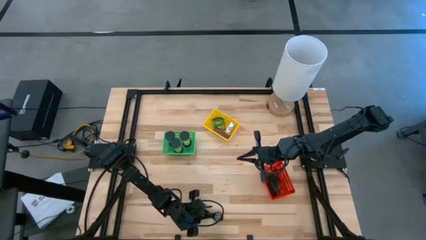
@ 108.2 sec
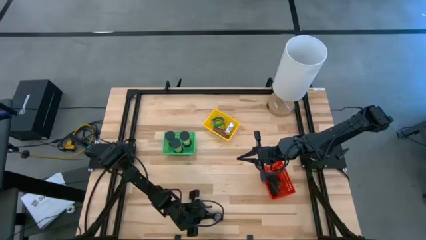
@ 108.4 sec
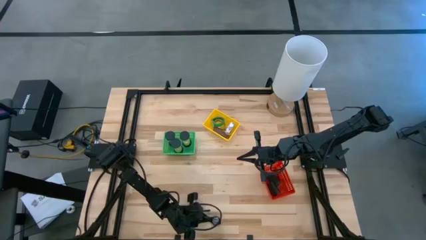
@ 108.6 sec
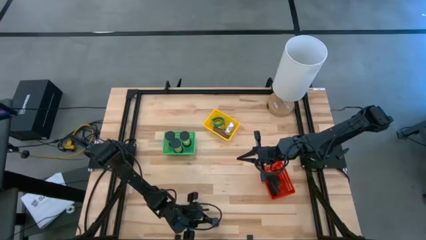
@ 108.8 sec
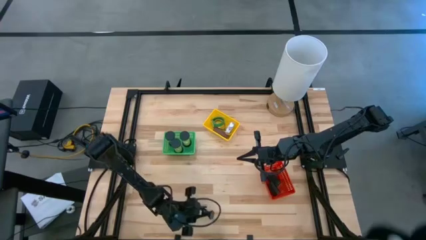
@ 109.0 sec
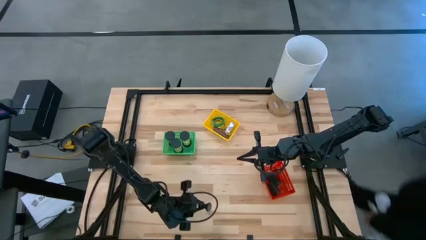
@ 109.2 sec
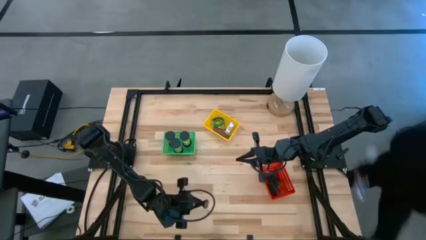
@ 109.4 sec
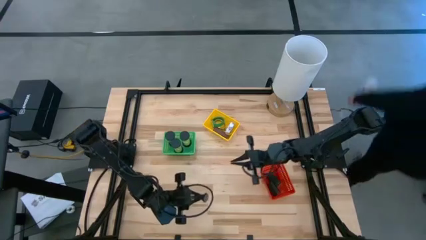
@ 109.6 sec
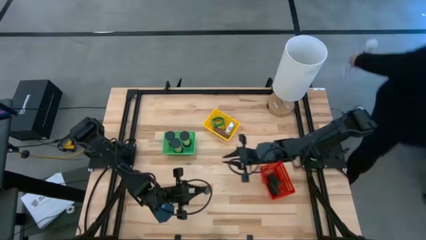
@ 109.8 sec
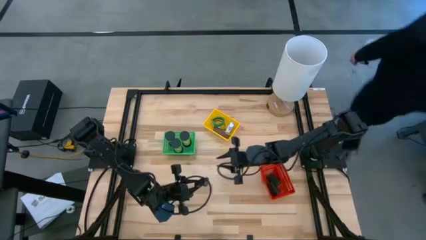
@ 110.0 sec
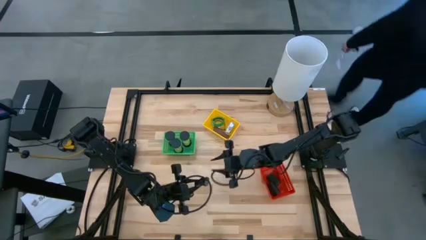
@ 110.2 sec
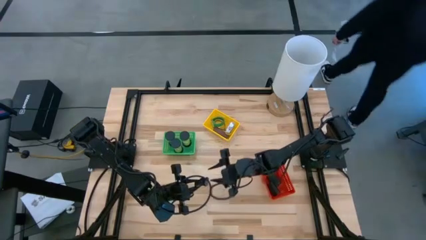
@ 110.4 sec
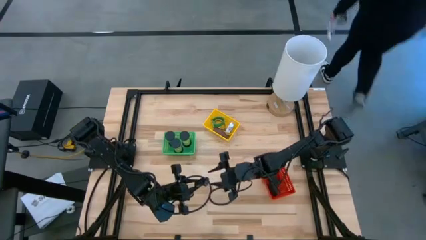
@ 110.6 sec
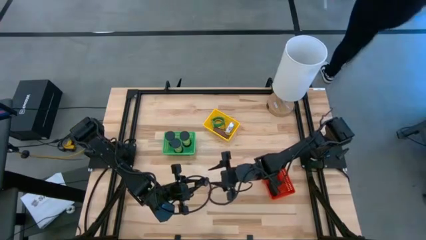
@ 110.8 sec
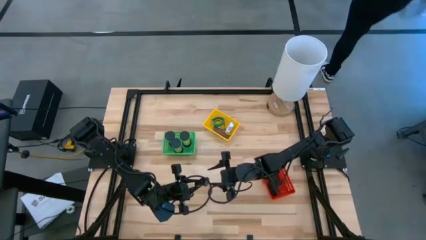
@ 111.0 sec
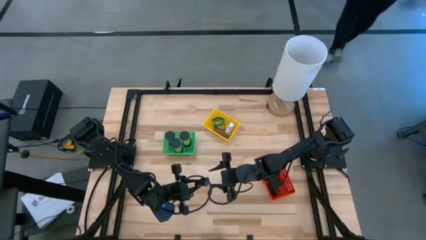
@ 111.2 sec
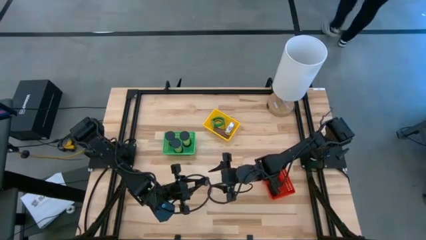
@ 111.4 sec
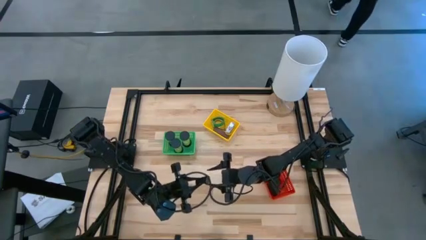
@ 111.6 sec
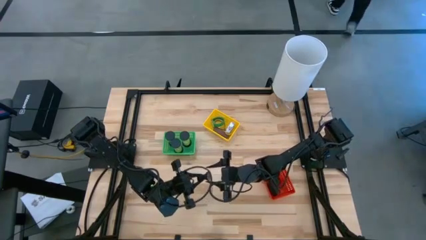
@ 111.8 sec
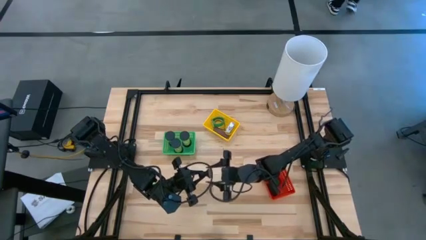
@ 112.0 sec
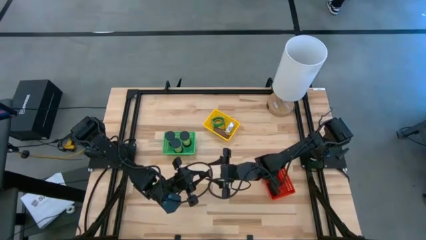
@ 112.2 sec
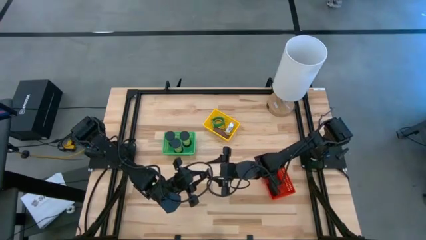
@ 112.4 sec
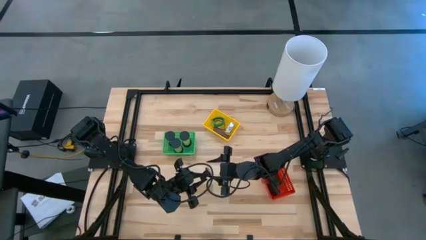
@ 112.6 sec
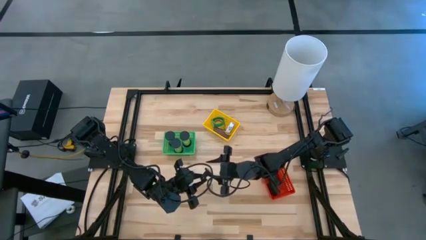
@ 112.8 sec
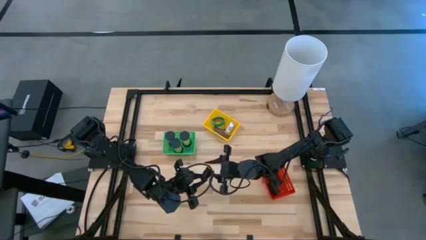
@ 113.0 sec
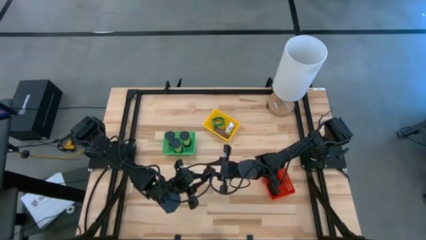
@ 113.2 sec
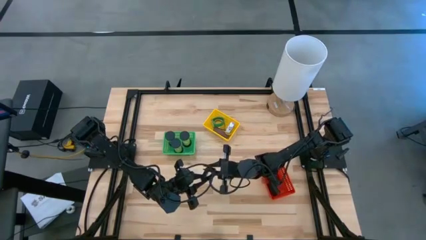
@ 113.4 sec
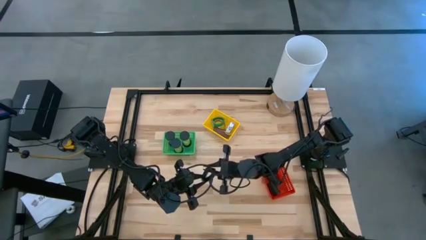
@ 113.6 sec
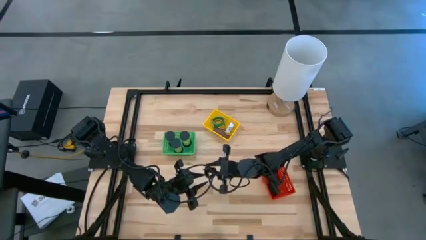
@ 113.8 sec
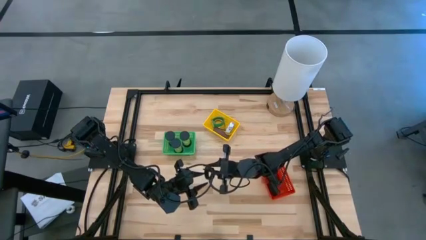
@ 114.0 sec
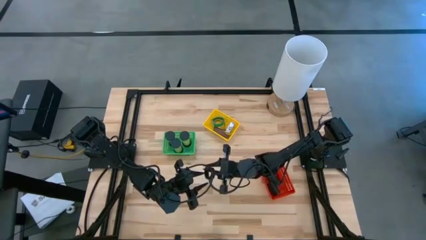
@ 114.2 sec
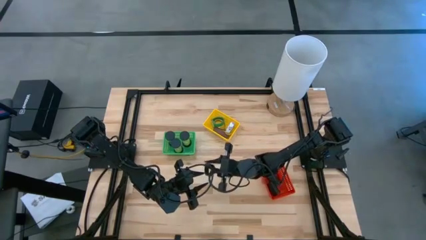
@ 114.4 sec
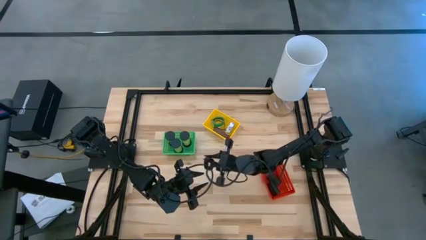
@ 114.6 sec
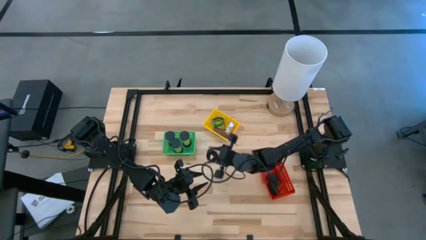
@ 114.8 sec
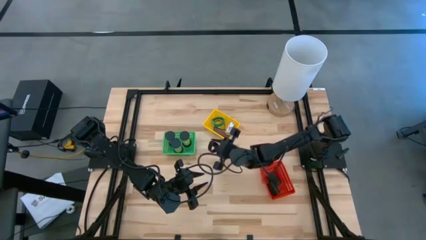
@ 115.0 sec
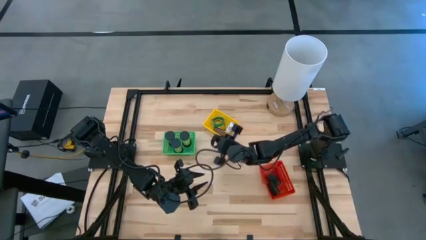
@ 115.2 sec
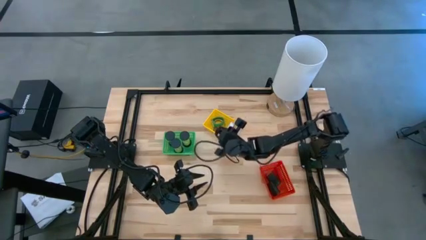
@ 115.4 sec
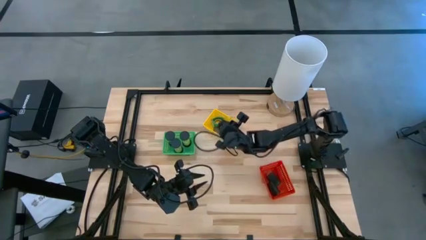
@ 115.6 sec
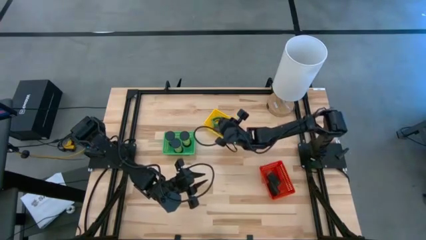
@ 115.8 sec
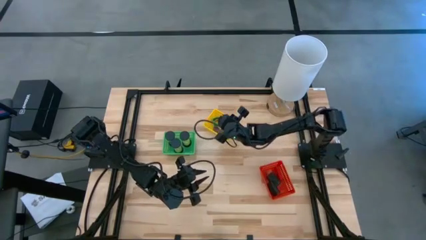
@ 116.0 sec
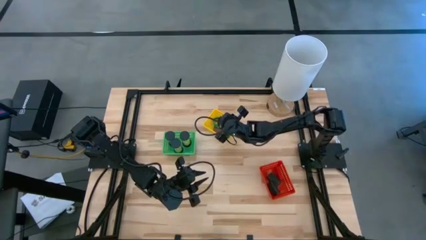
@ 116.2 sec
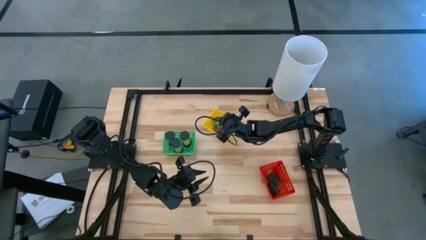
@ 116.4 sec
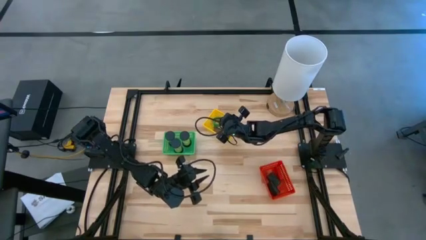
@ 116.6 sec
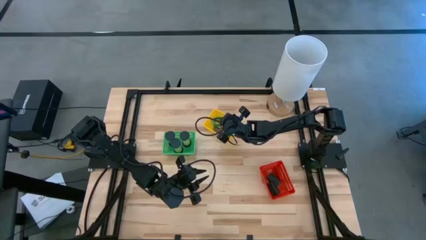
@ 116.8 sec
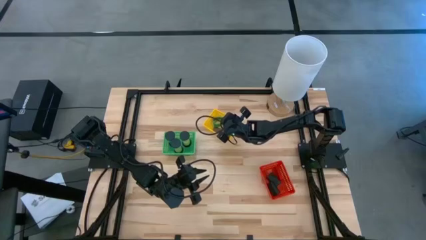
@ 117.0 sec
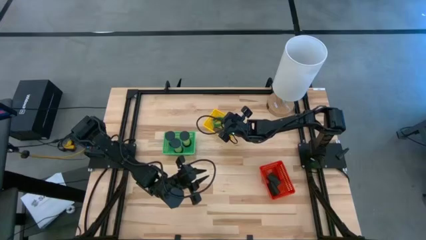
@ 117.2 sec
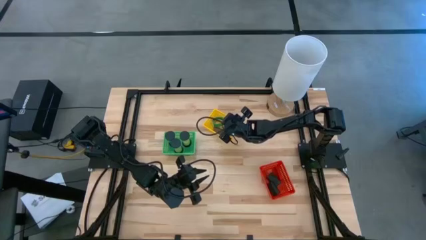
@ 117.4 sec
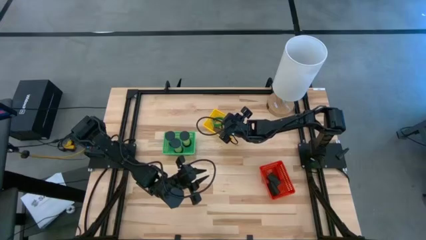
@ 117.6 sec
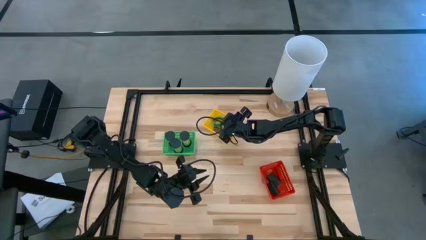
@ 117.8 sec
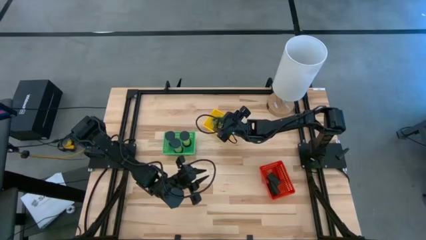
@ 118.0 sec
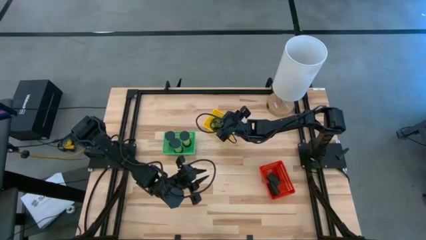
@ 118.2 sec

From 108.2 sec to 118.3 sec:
Task: Pick & Place Office items
Put the black watch into the yellow basket

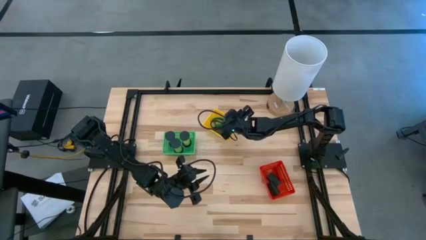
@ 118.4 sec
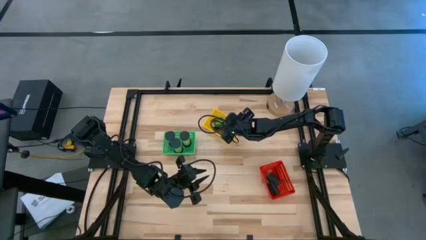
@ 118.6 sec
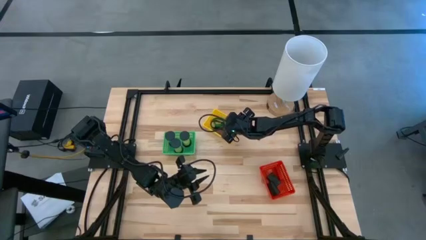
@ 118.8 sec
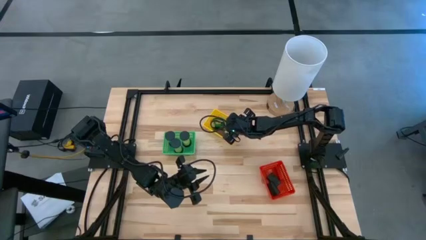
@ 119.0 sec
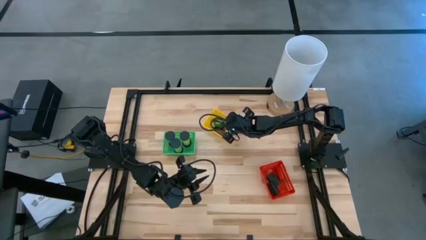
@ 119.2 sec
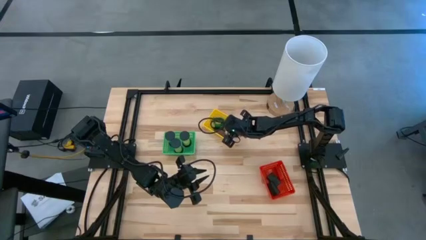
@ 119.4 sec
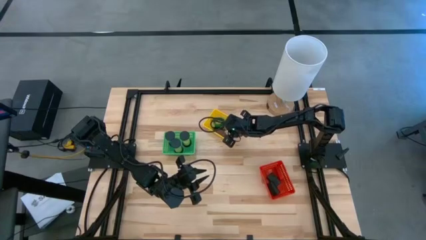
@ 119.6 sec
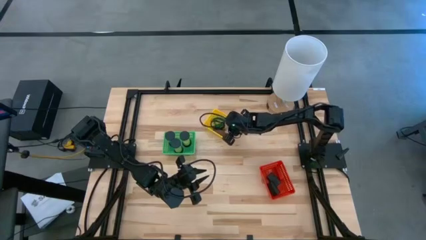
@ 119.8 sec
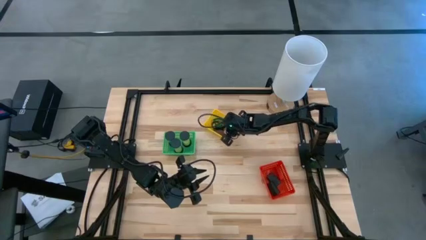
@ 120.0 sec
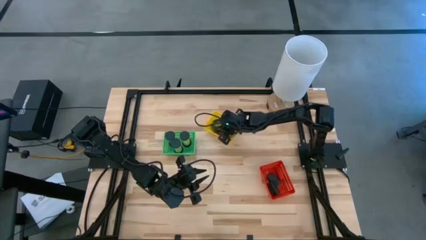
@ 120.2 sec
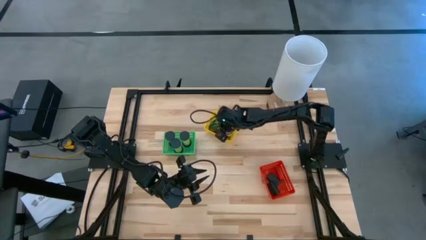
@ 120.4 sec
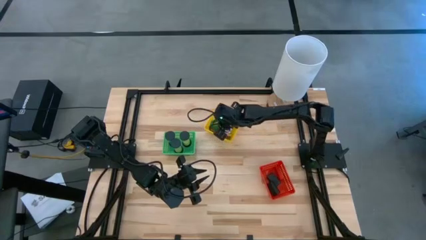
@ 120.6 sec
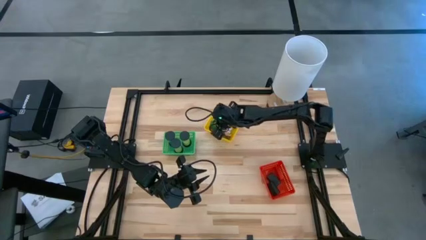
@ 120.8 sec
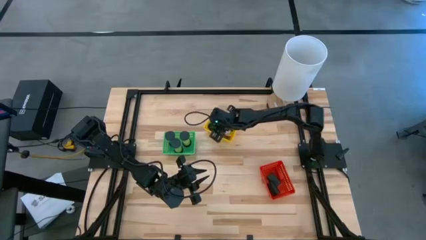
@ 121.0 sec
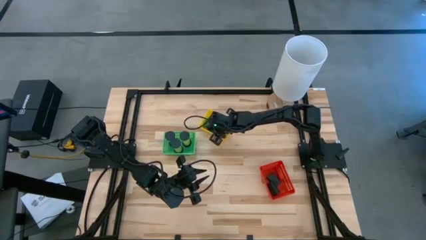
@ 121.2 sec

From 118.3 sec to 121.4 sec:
Adjust the watches in the yellow basket

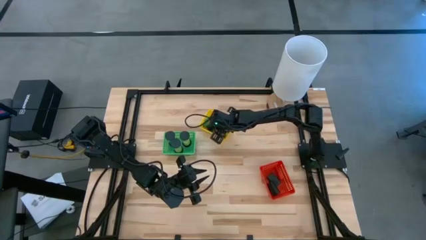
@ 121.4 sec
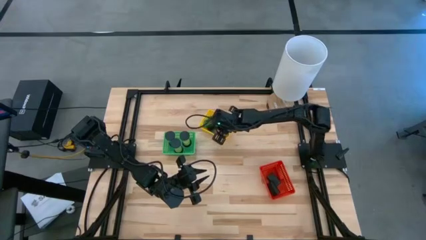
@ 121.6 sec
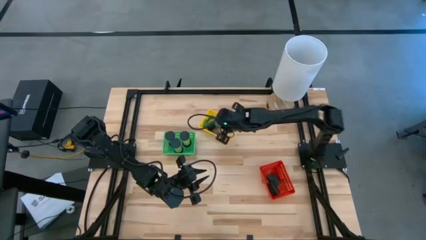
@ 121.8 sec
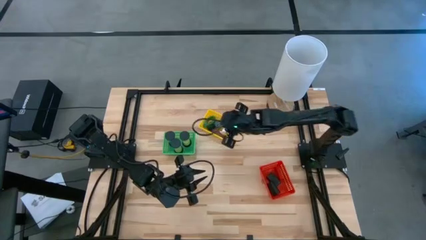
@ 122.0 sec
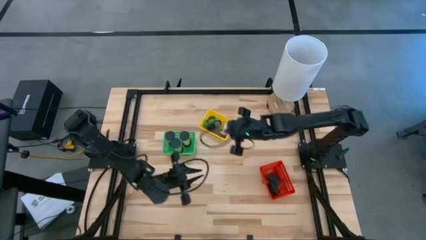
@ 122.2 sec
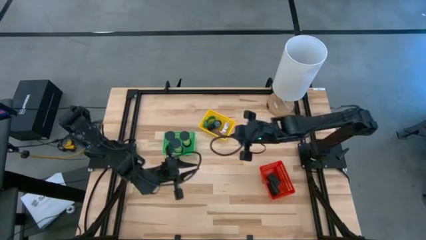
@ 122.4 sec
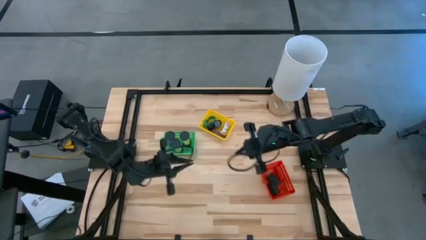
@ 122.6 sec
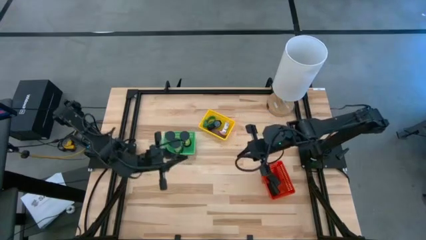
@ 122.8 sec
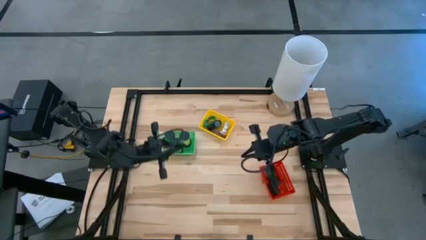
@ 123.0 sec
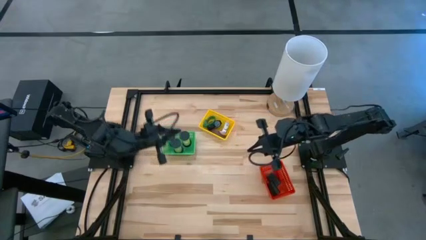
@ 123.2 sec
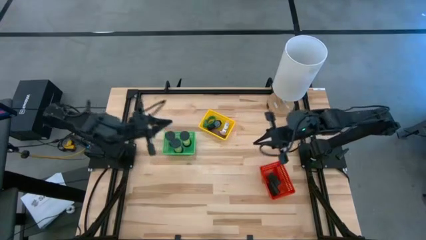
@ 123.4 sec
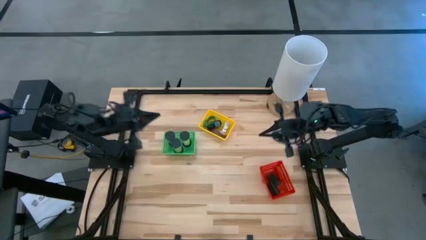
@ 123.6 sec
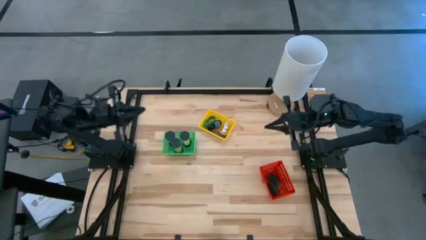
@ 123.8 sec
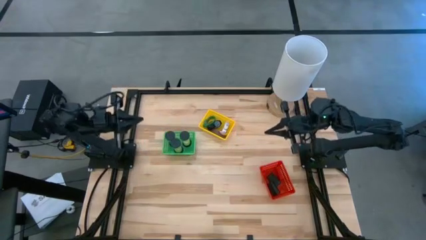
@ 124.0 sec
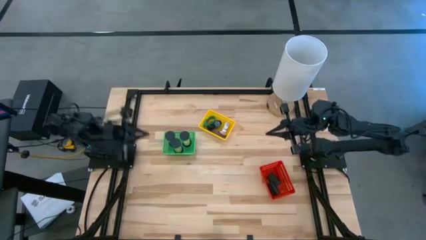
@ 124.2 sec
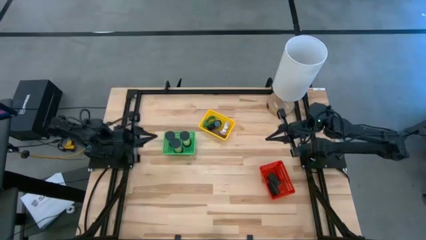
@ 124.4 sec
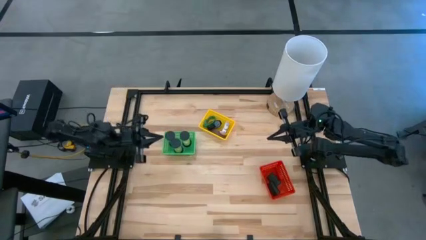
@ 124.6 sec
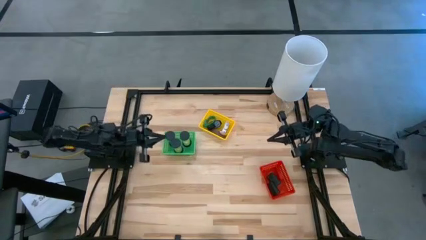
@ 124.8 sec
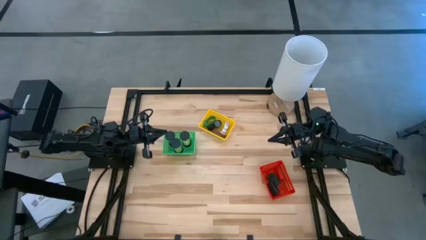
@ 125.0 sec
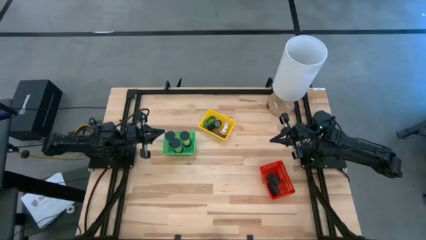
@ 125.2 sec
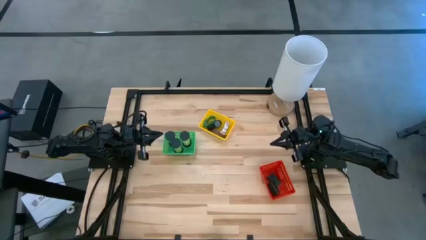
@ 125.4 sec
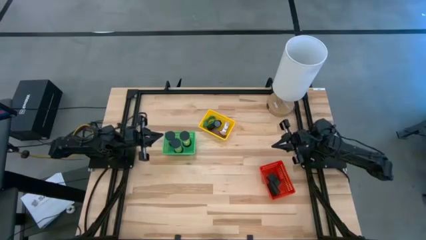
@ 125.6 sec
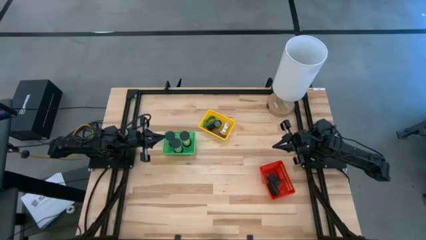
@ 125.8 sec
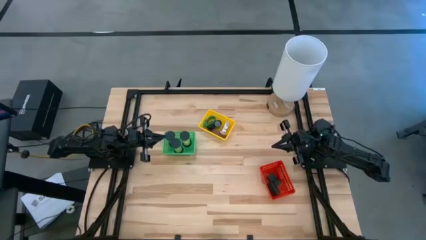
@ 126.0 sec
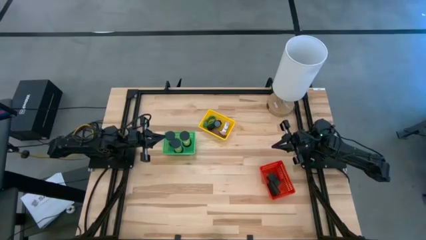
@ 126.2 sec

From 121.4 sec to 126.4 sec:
Return to Home Position
